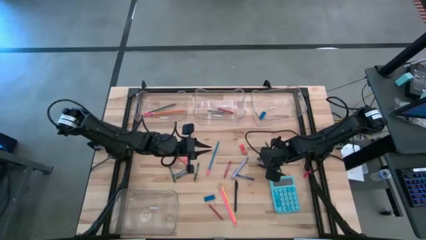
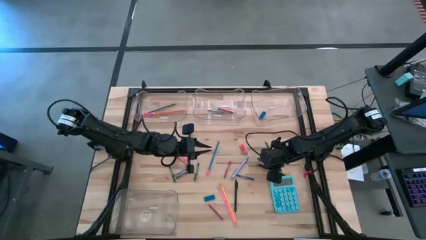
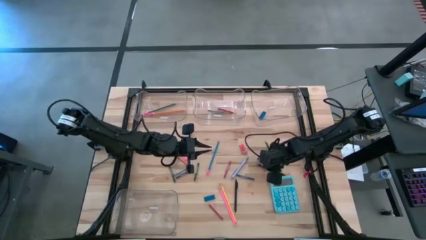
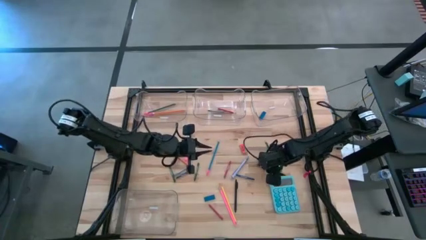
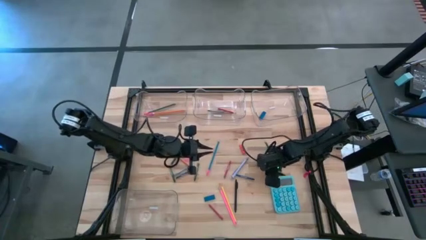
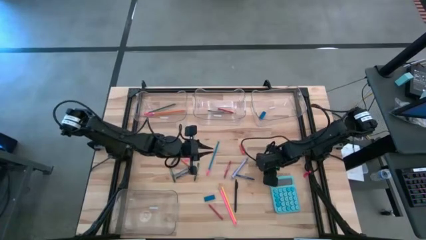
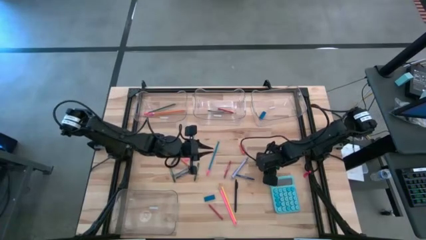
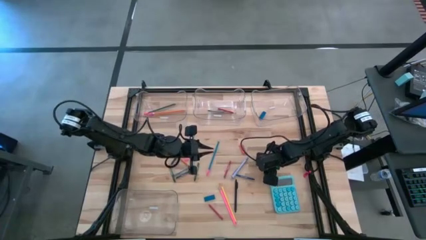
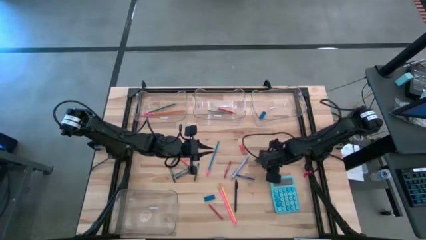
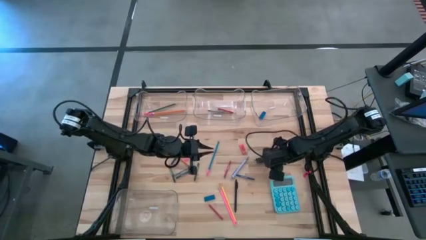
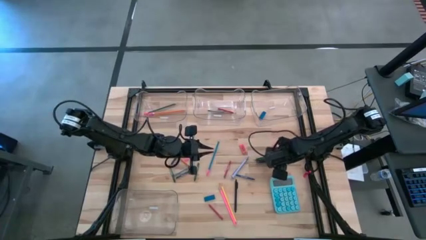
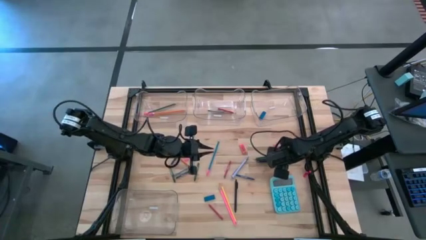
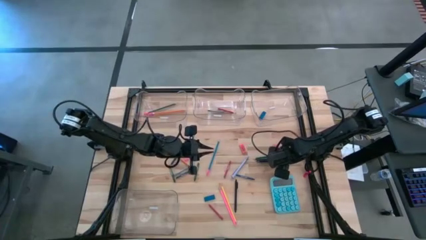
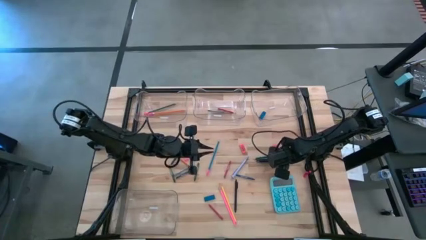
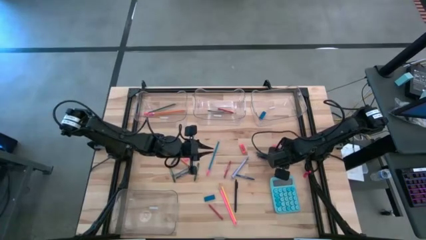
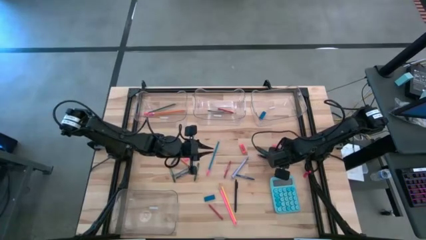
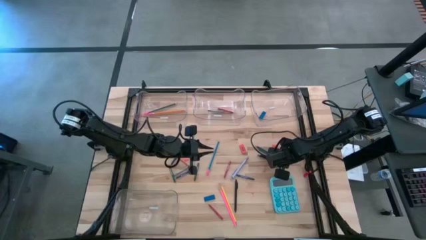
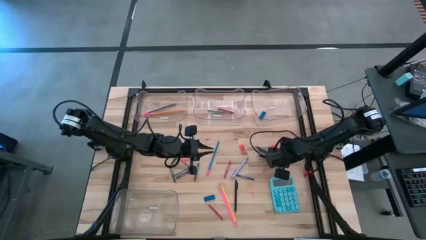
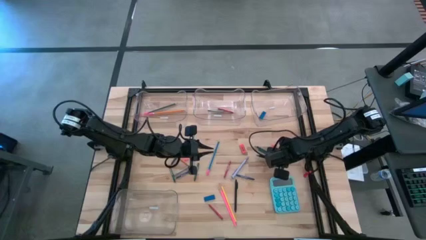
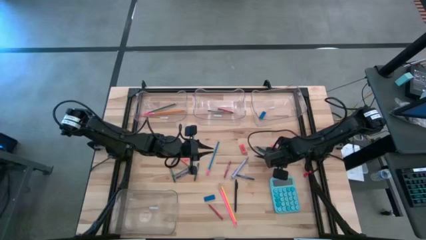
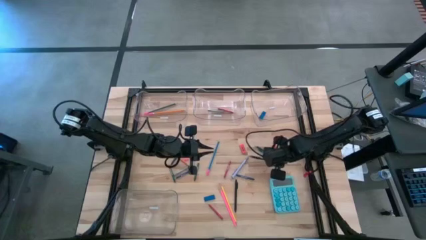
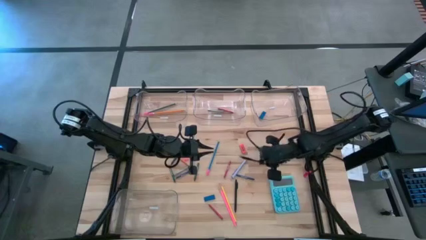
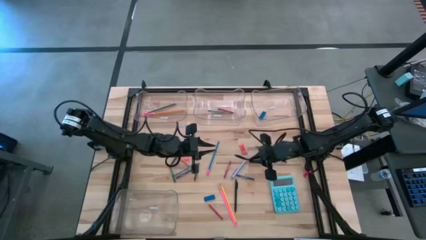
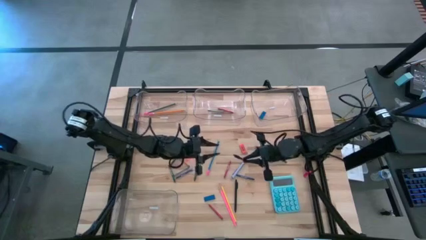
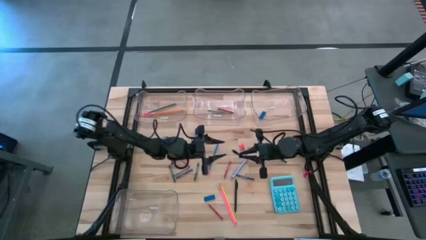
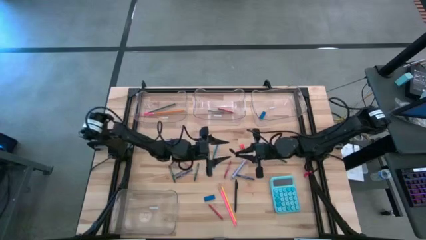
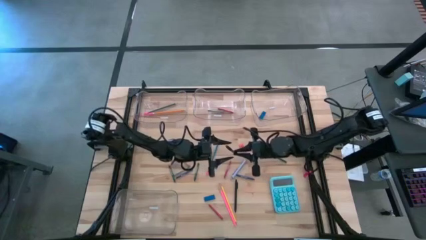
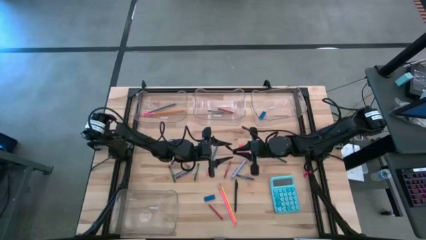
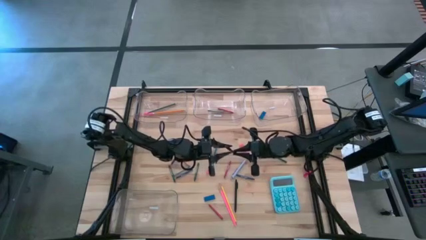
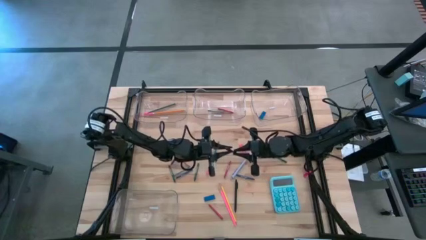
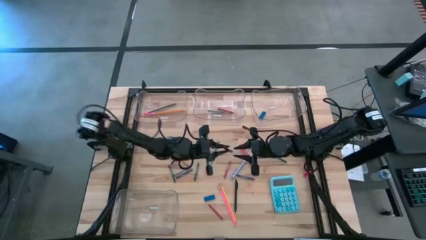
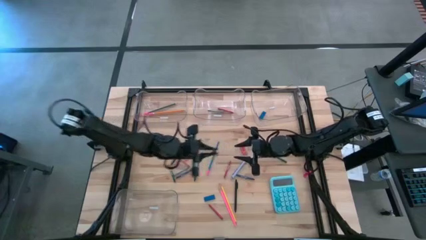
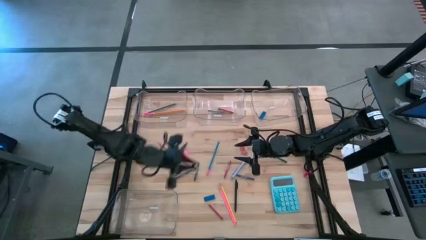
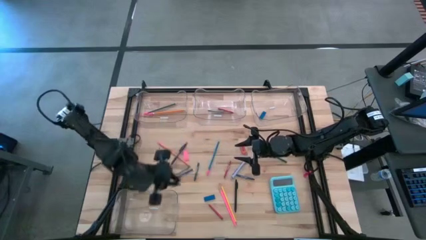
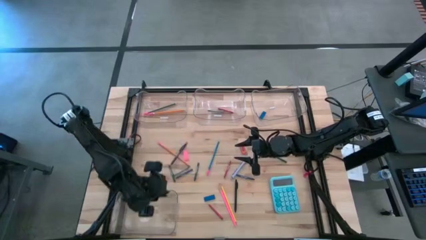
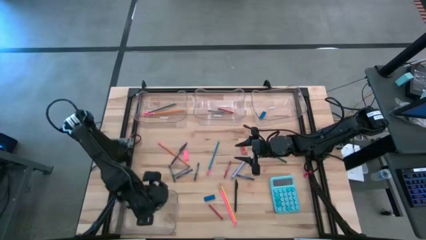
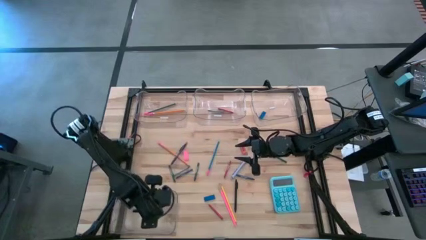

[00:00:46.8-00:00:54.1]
Task: Sort crayons/erasers/pens/pencils in bins
Put the black pen into the bottom transparent bin

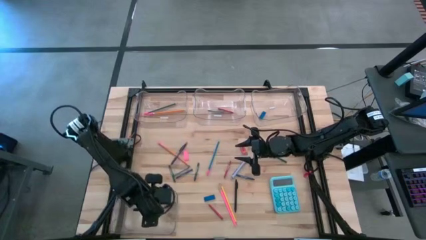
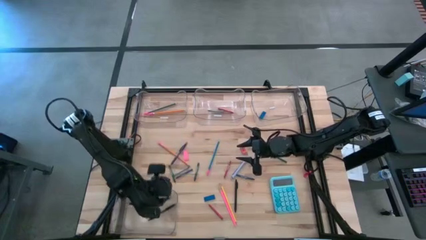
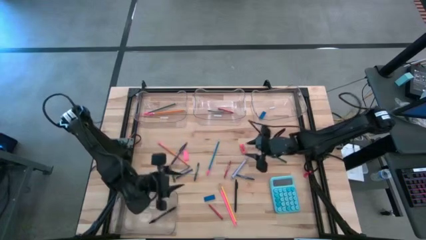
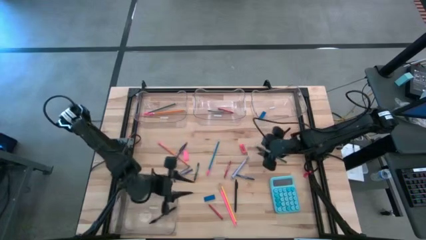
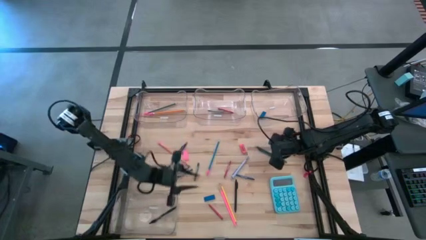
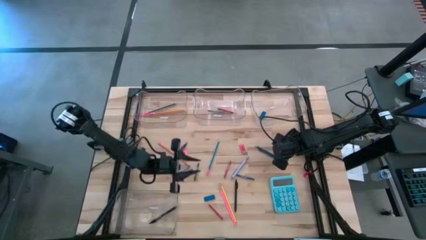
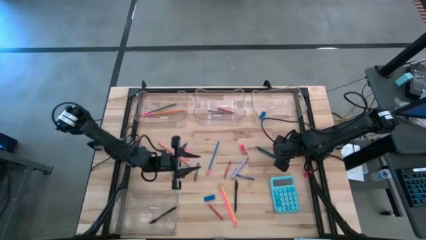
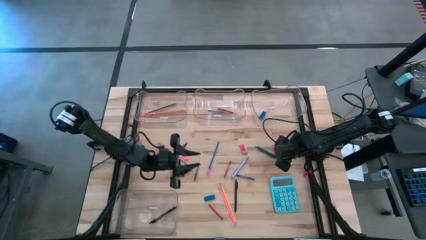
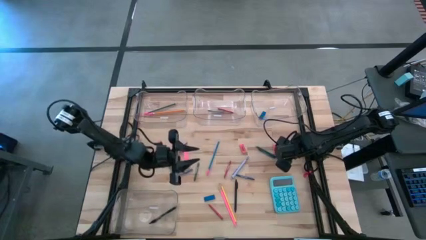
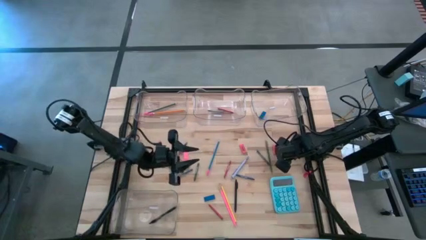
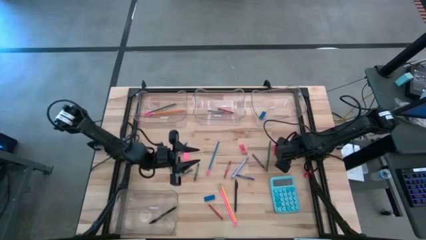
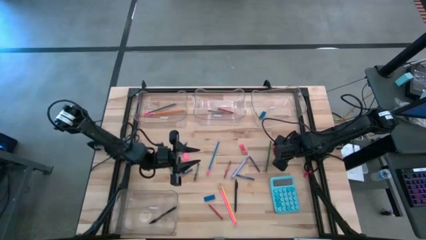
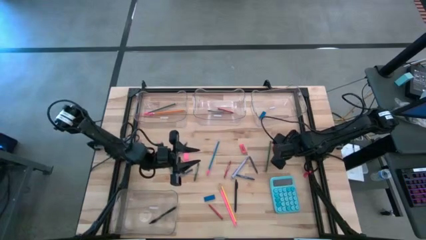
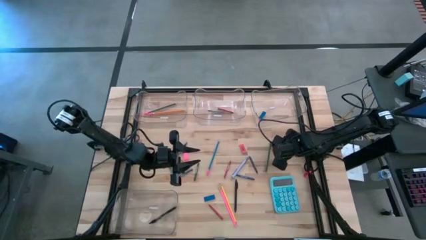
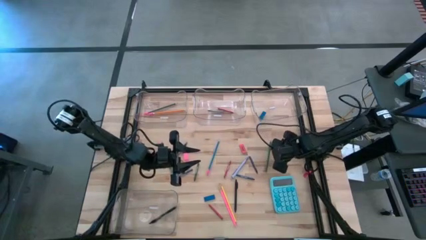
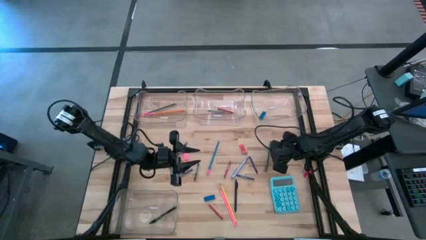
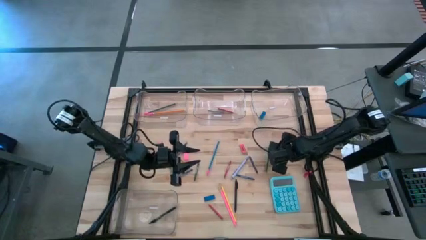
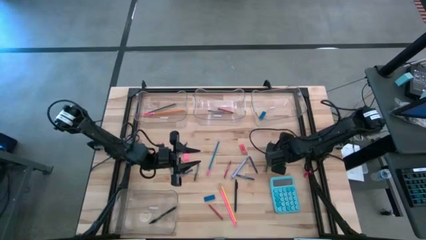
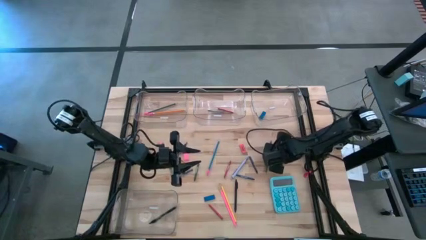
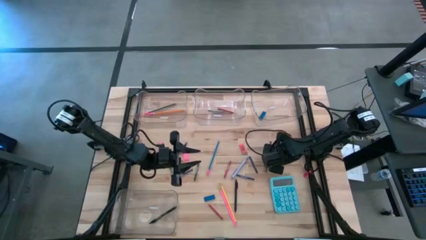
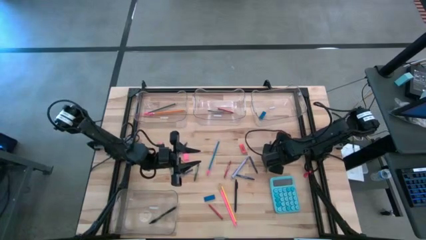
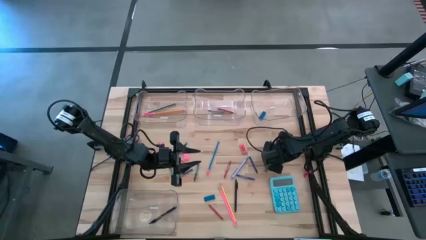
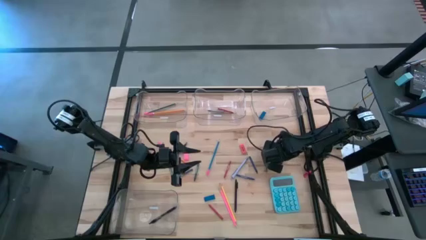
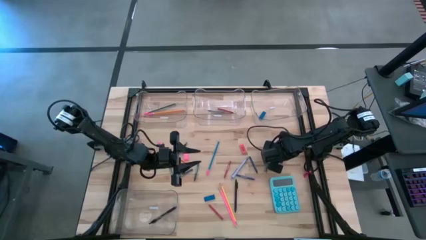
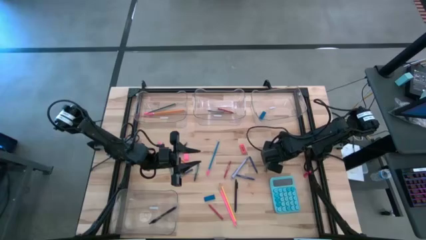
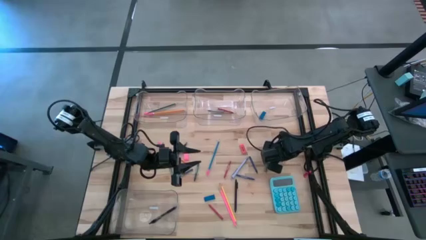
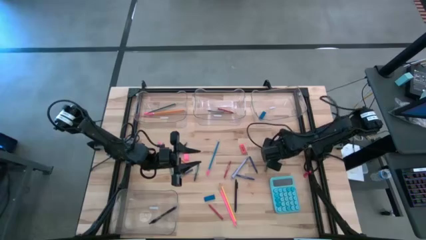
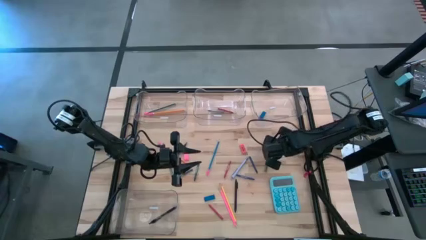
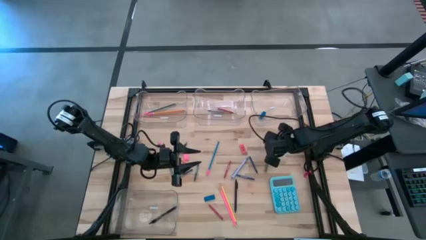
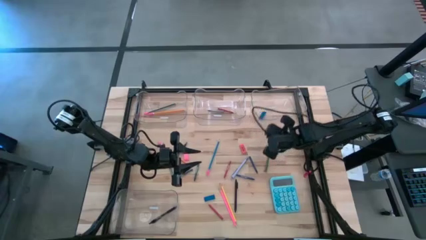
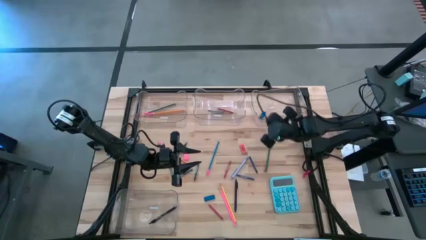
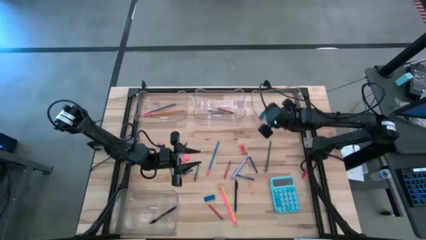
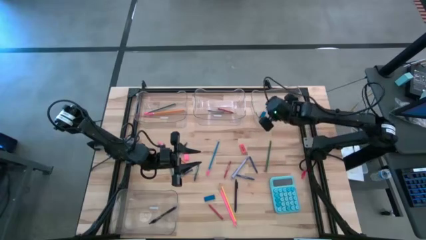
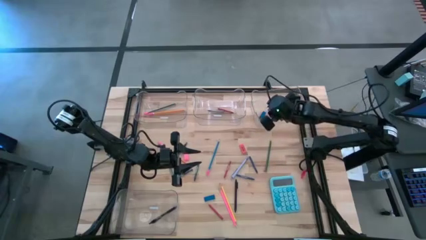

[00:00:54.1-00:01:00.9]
Put the orange eraser into the top right transparent bin

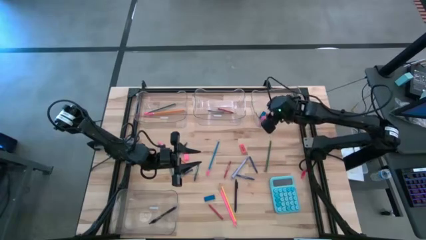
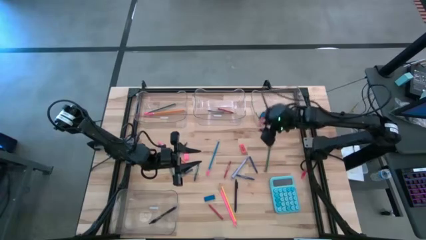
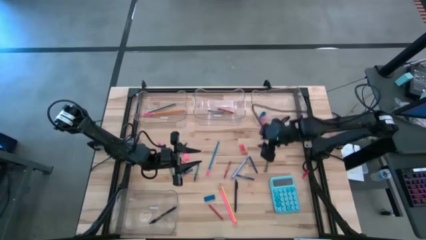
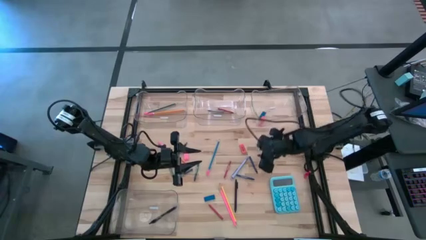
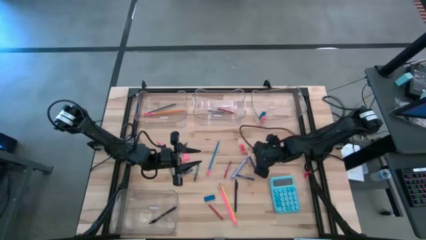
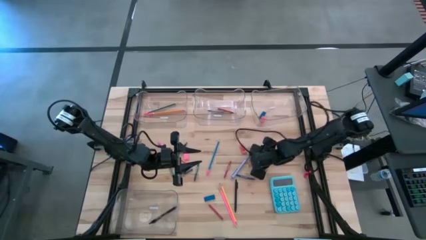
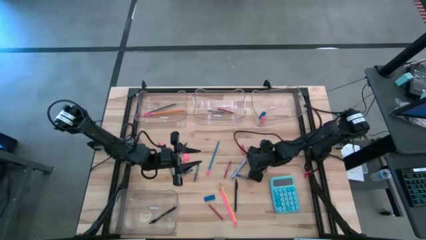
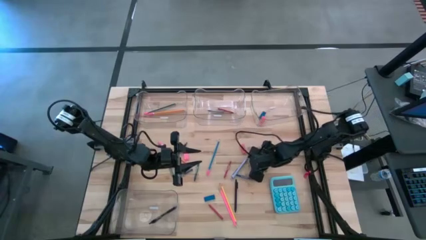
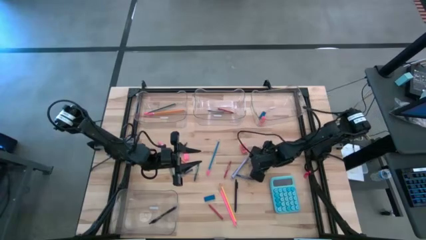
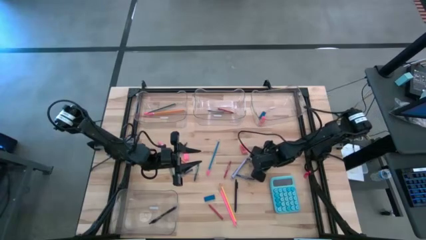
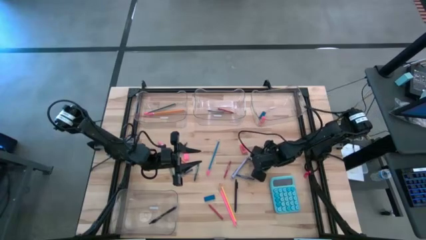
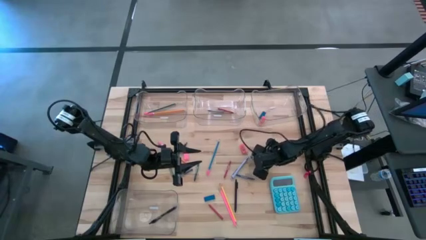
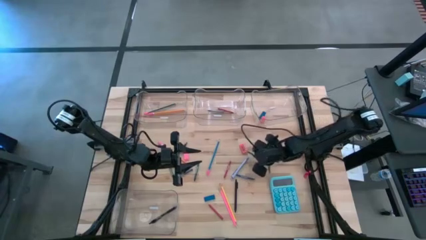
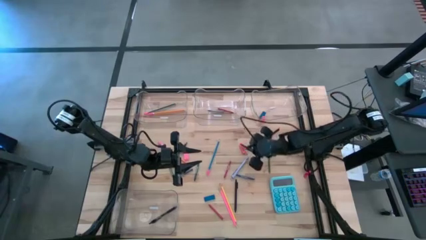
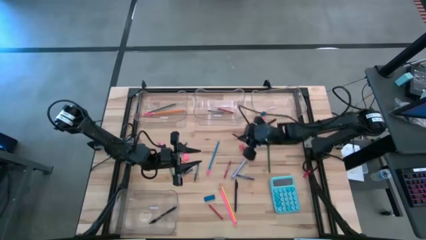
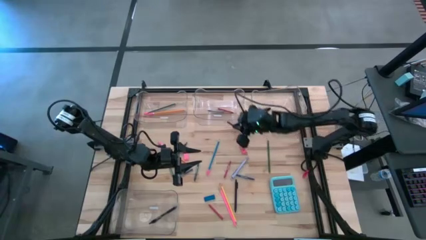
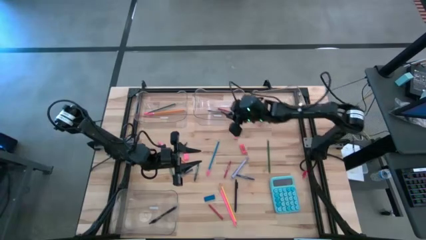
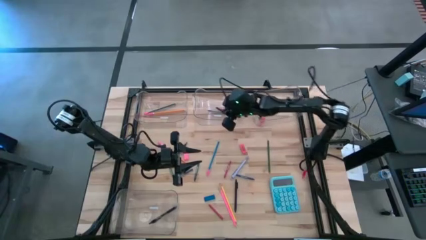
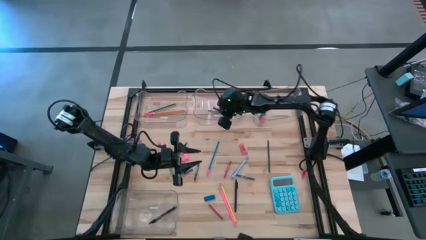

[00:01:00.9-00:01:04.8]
Put the blue crayon into the top middle transparent bin
